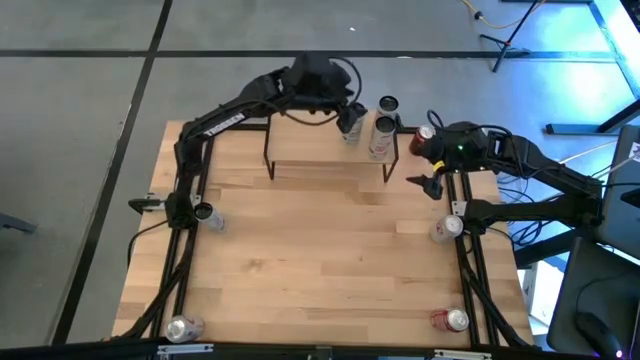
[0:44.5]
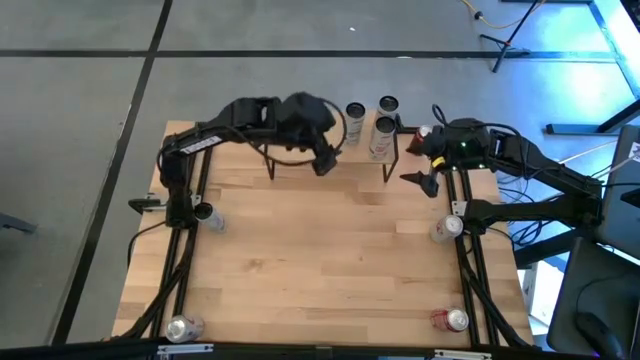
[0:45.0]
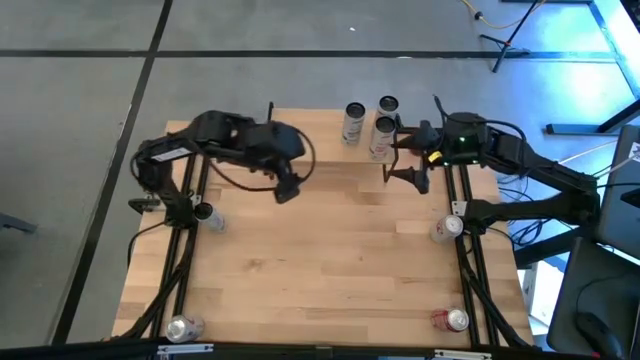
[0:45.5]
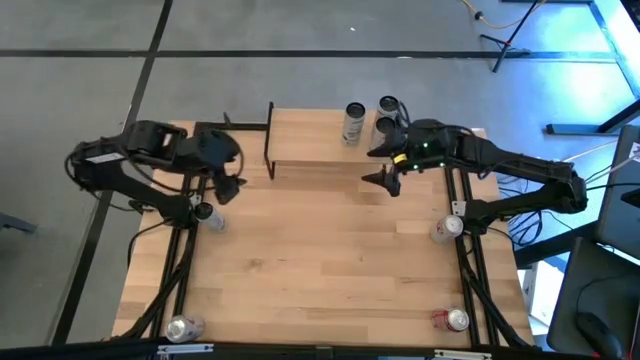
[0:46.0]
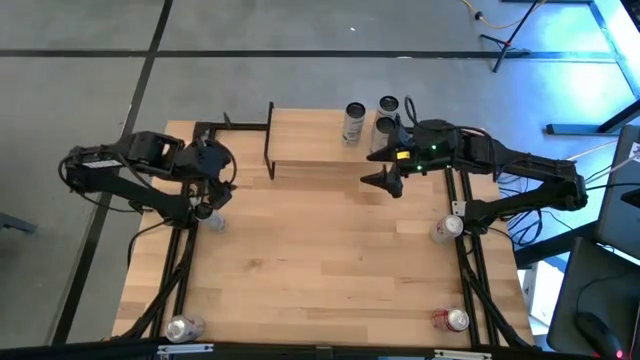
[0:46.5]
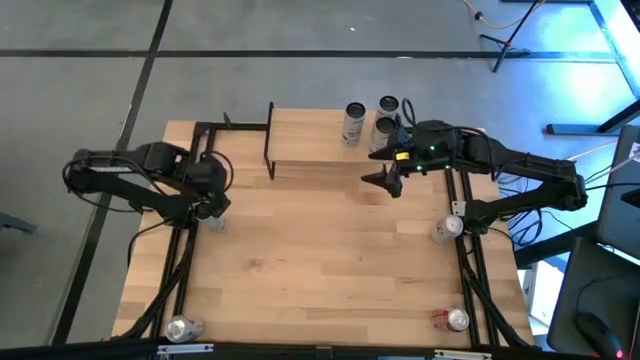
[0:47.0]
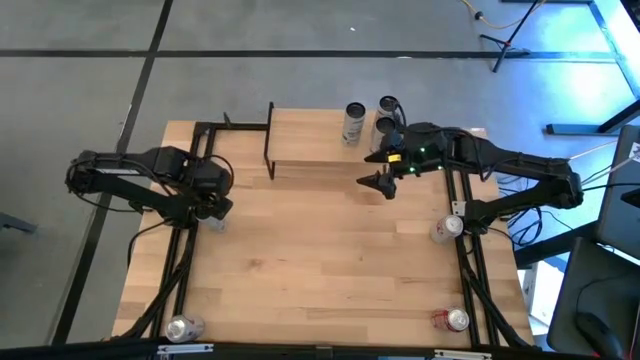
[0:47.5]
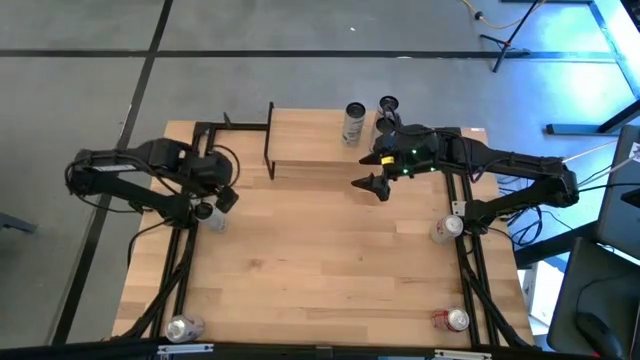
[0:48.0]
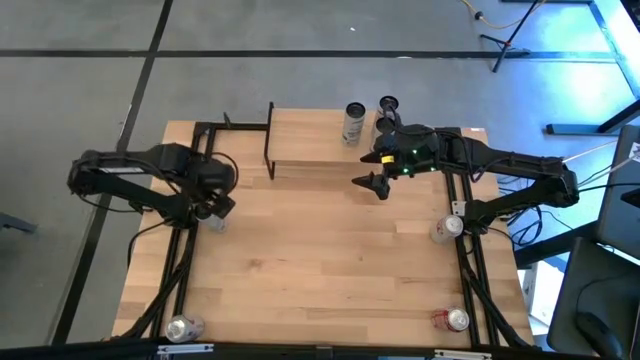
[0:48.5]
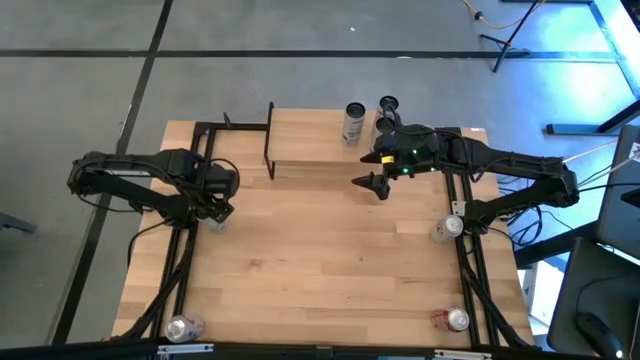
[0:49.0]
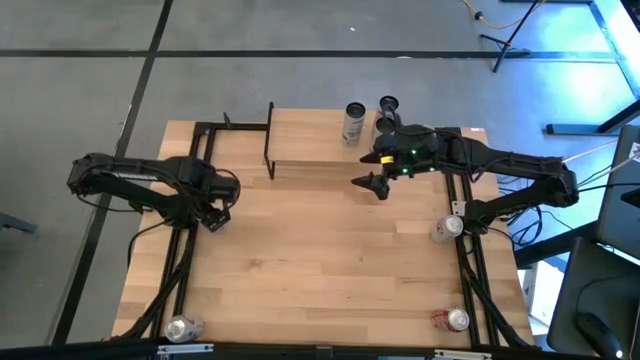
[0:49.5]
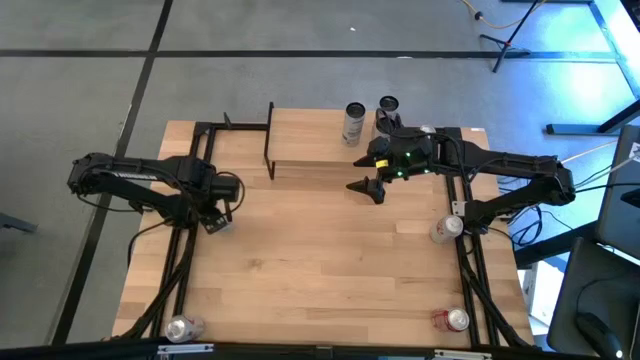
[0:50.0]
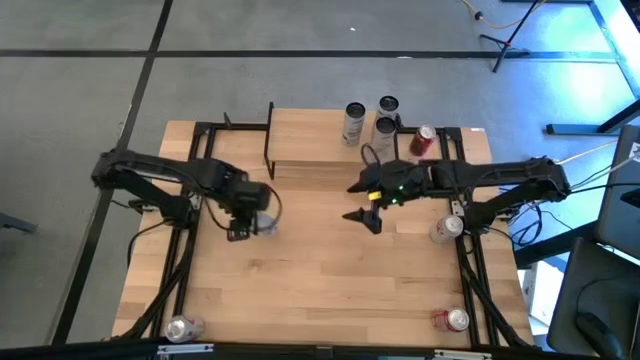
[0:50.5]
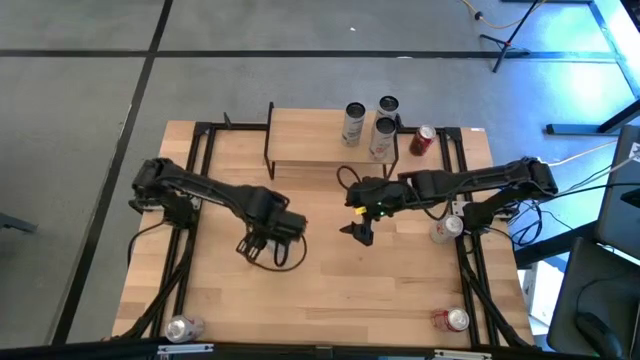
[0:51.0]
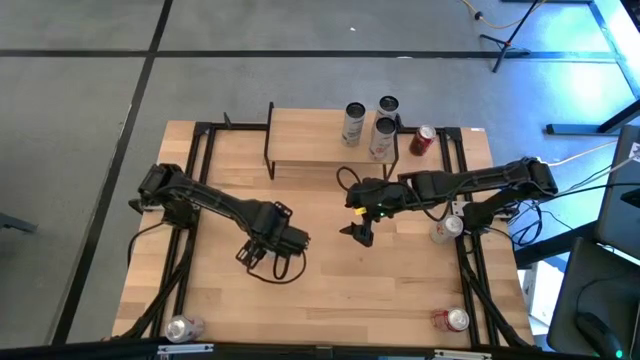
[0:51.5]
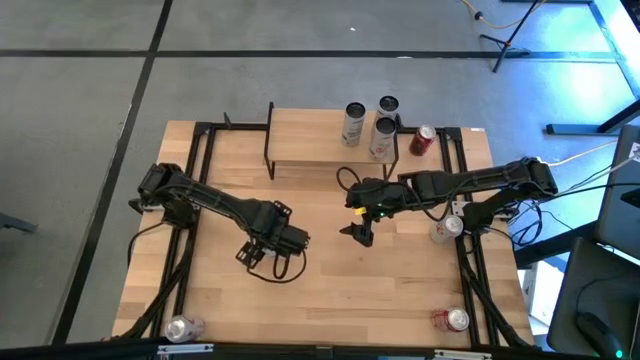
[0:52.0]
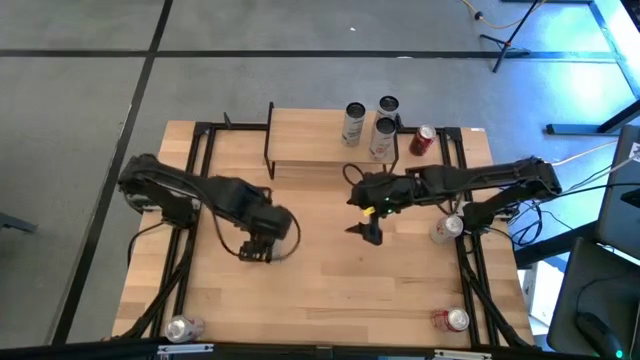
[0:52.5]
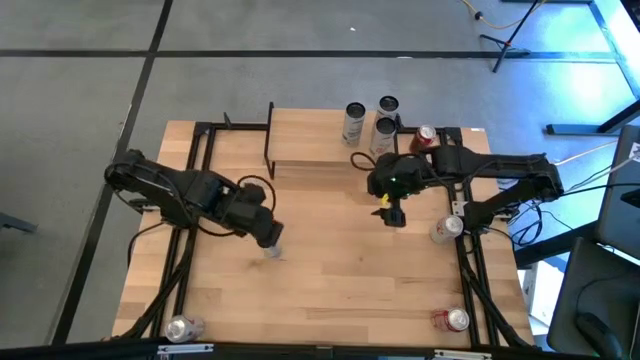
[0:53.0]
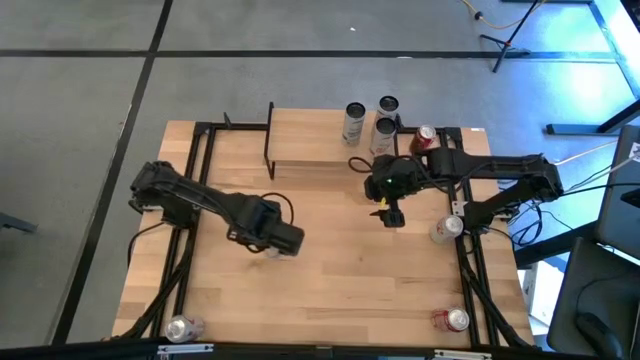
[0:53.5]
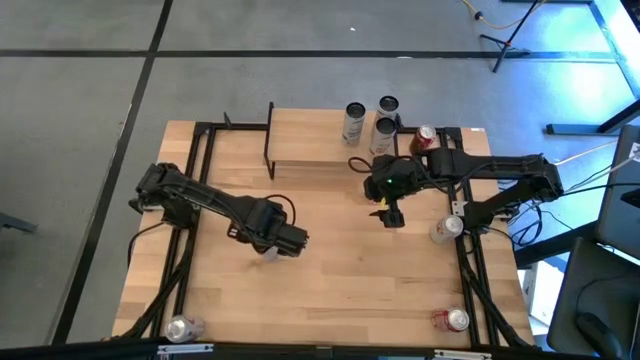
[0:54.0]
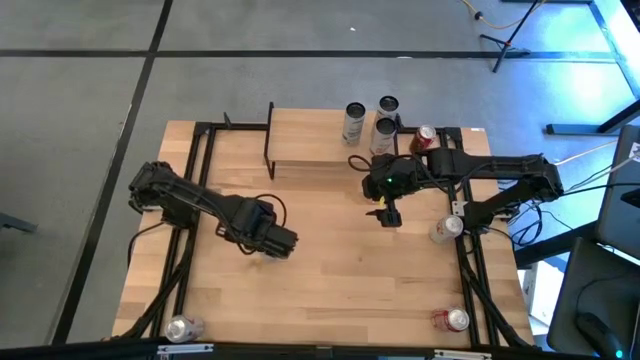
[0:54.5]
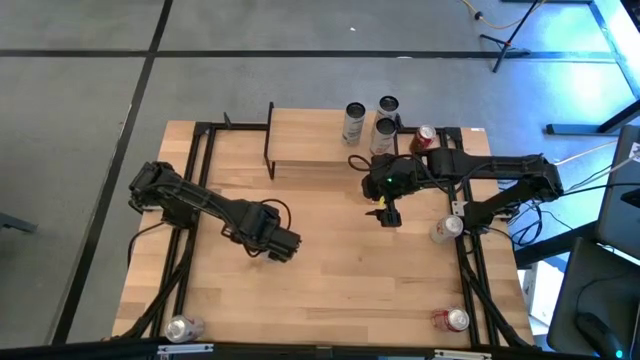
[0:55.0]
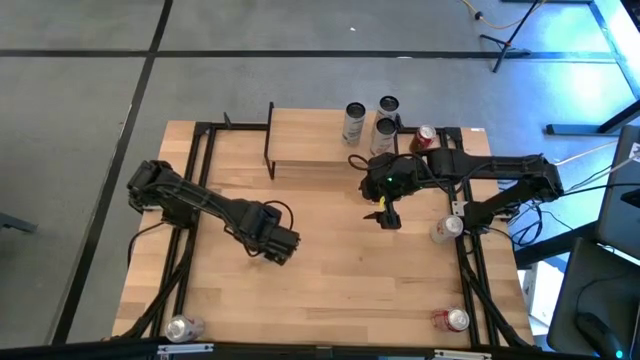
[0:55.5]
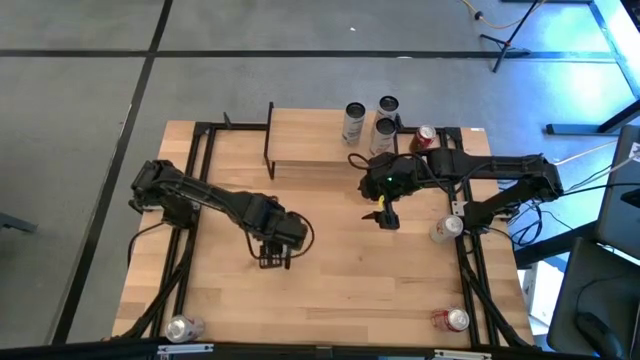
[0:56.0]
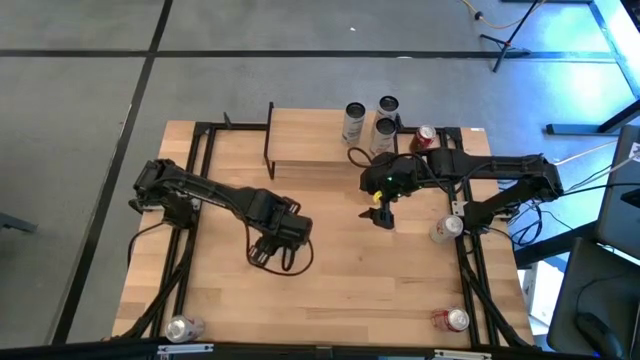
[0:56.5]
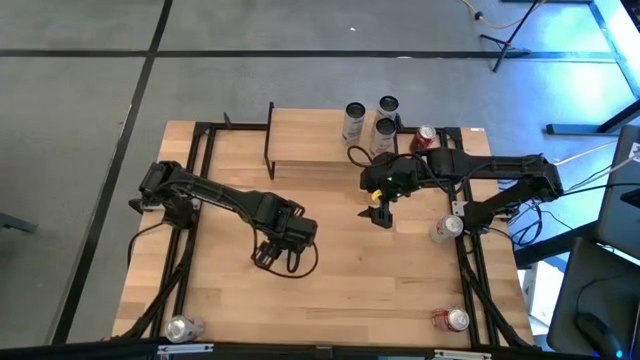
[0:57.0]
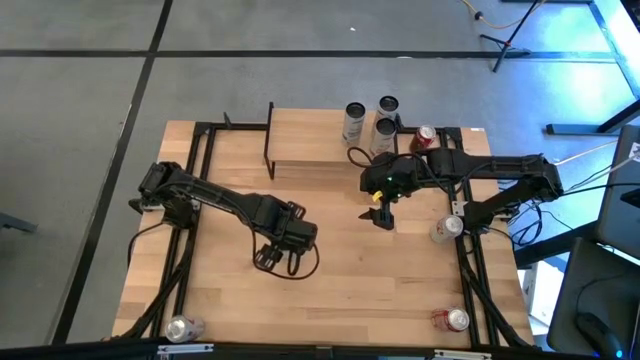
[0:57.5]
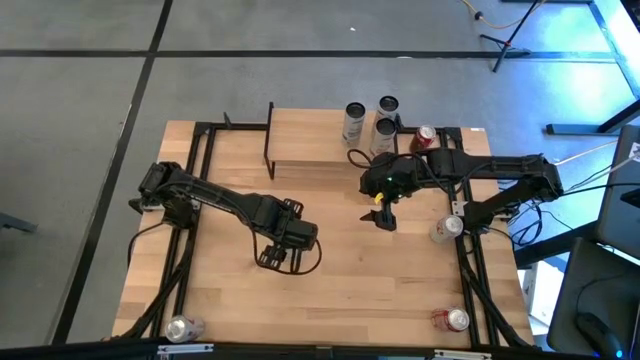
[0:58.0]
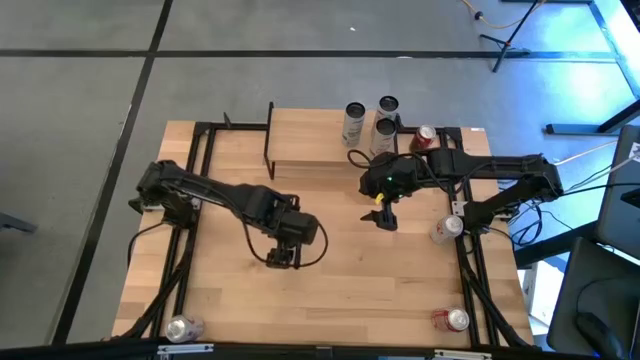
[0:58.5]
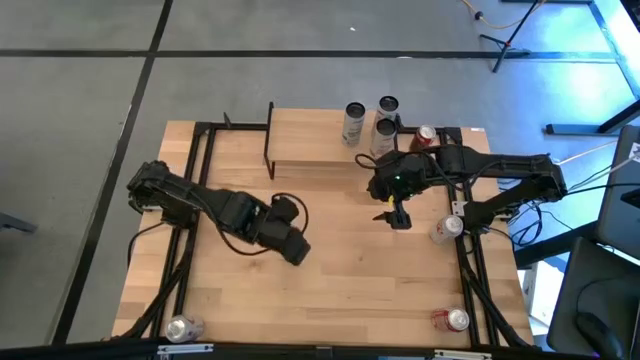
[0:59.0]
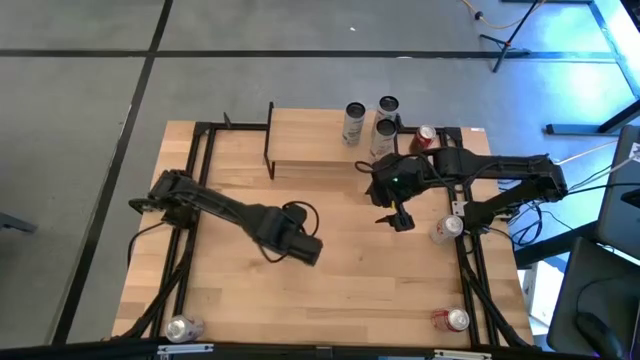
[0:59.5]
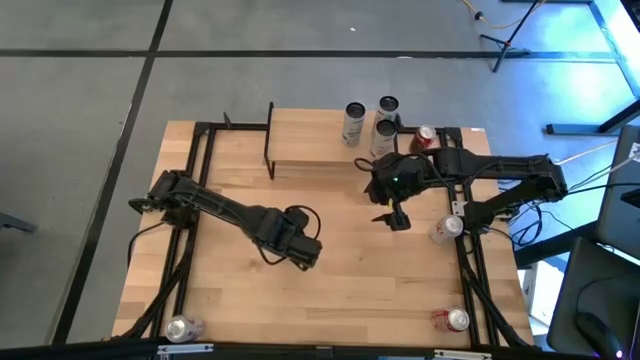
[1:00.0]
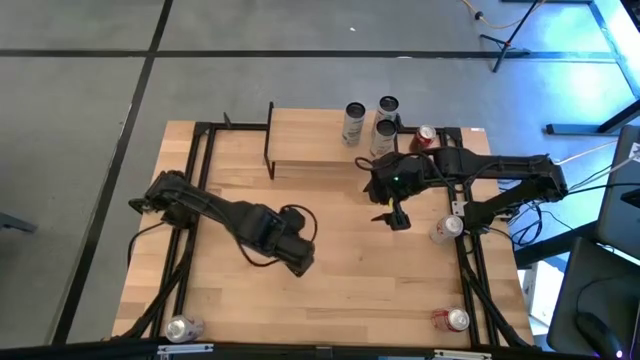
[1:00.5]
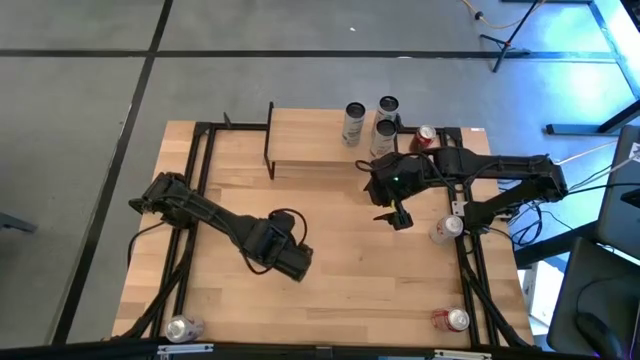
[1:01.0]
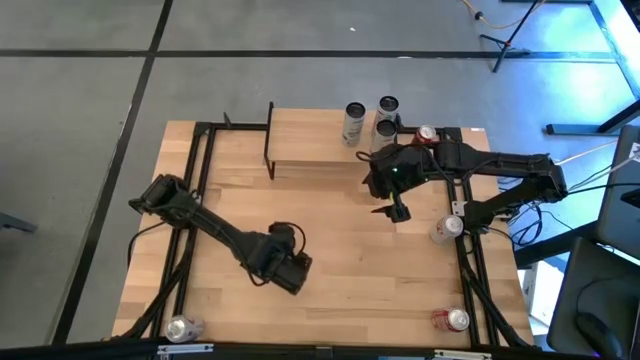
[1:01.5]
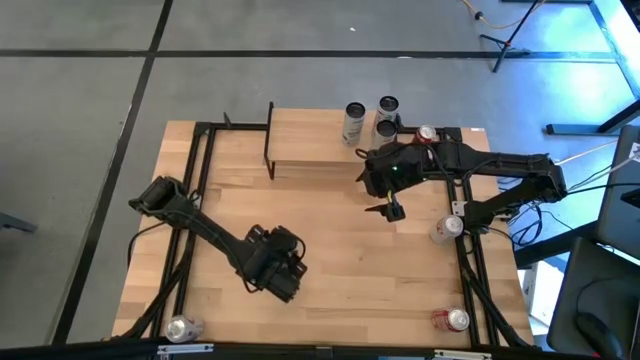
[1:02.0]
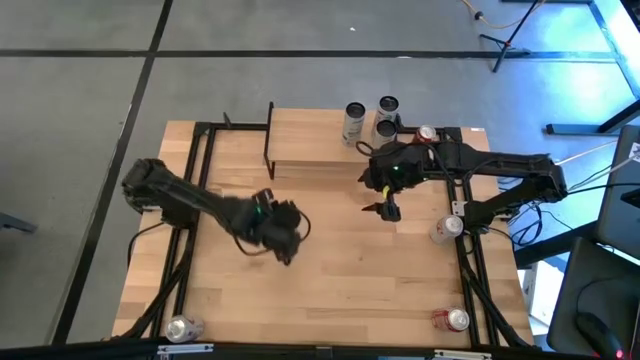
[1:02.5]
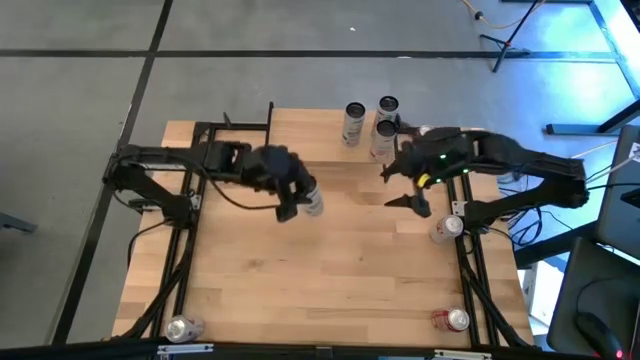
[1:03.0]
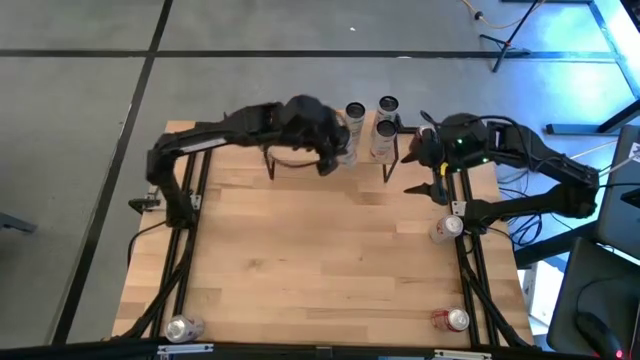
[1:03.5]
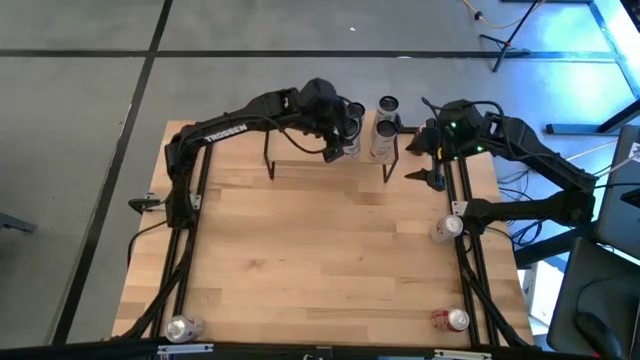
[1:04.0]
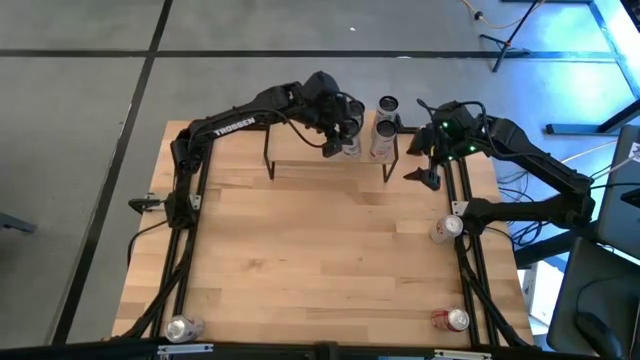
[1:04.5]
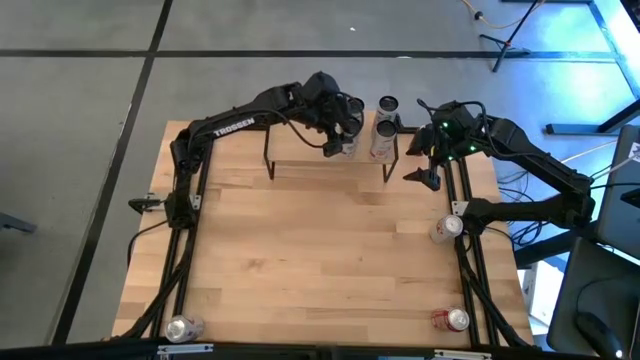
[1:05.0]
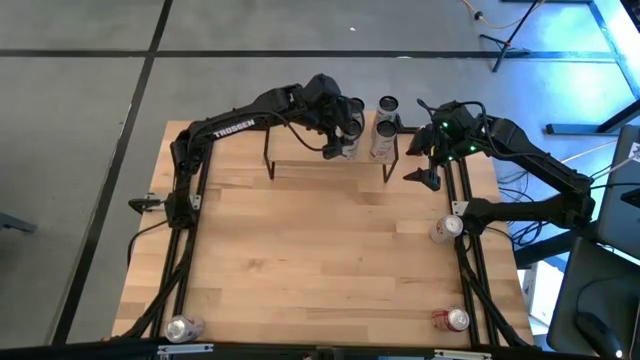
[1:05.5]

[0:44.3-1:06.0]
Task: Place canned beverage on shelf
Put the white-blue soda can on the shelf aligned with the other white-blue soda can
